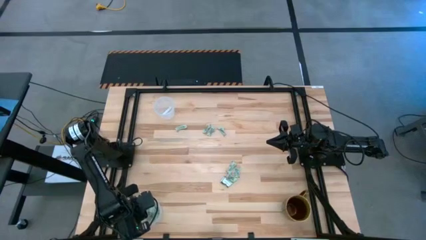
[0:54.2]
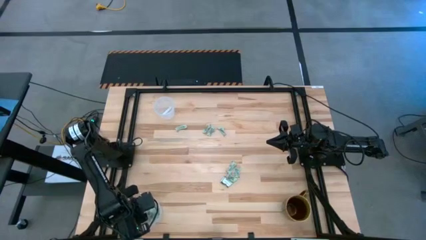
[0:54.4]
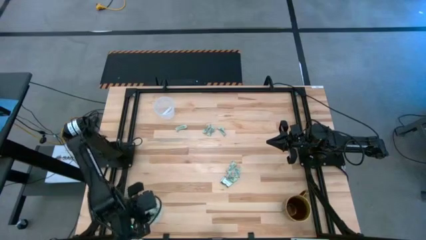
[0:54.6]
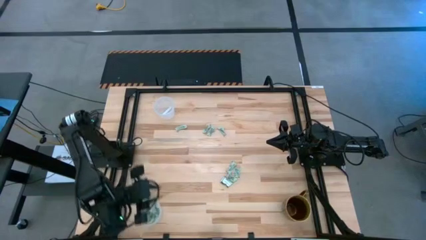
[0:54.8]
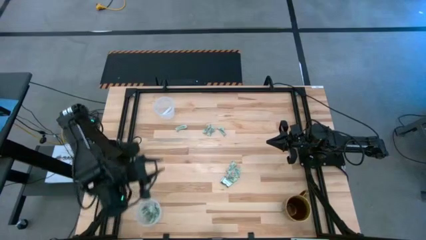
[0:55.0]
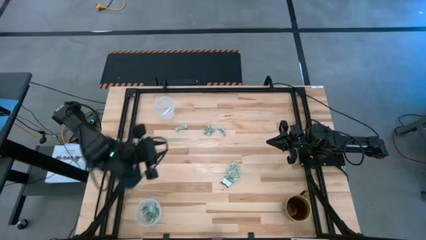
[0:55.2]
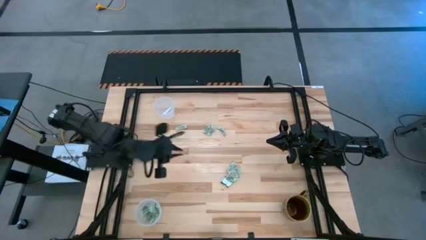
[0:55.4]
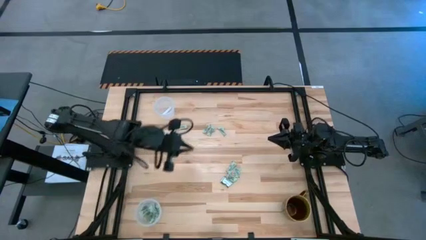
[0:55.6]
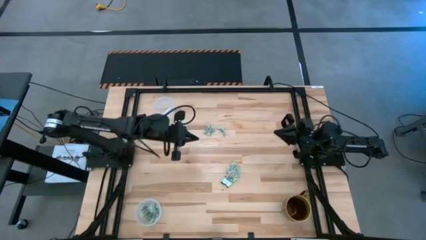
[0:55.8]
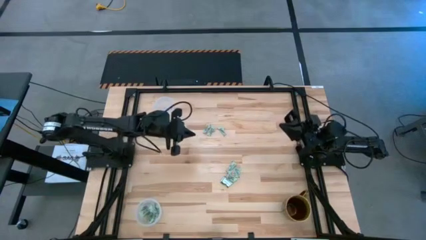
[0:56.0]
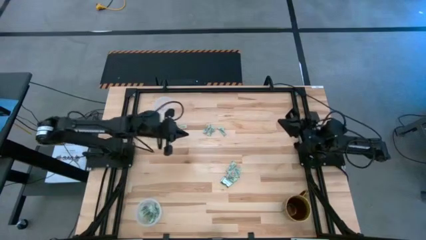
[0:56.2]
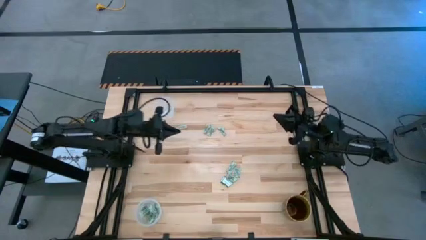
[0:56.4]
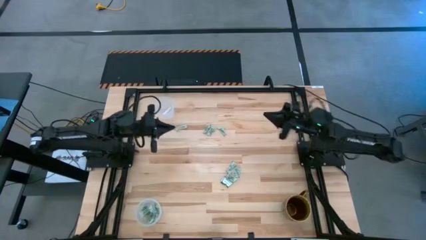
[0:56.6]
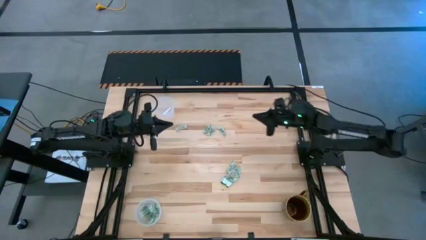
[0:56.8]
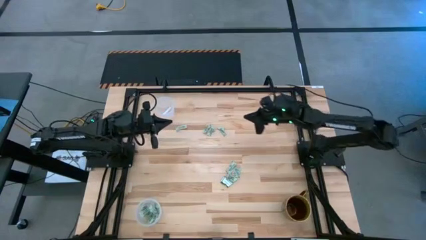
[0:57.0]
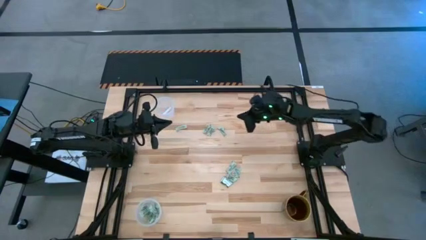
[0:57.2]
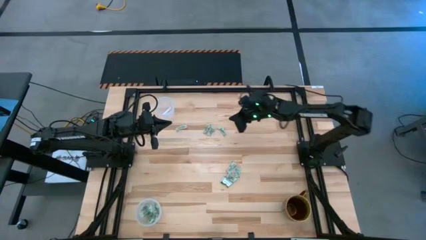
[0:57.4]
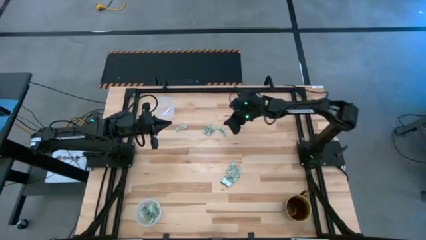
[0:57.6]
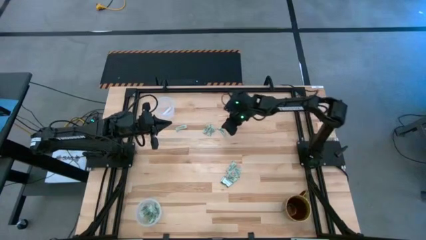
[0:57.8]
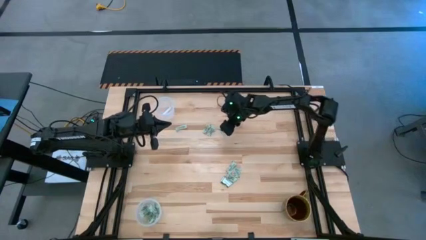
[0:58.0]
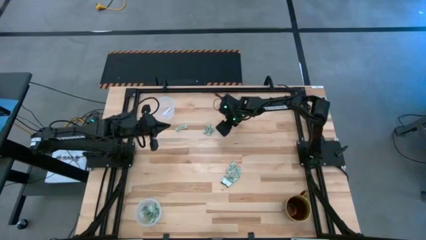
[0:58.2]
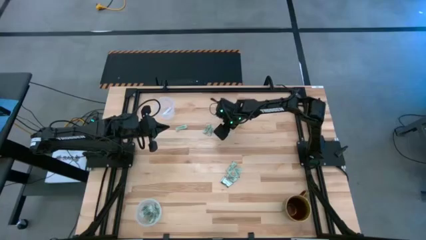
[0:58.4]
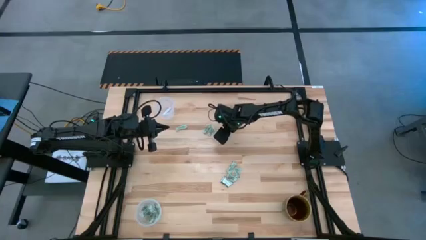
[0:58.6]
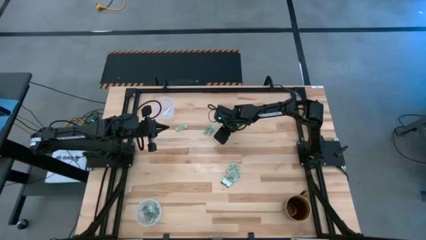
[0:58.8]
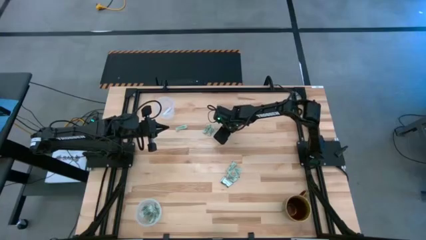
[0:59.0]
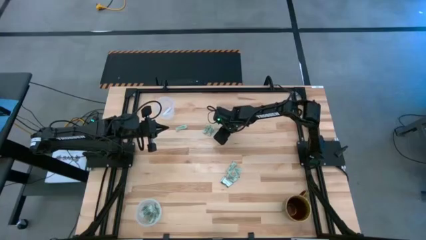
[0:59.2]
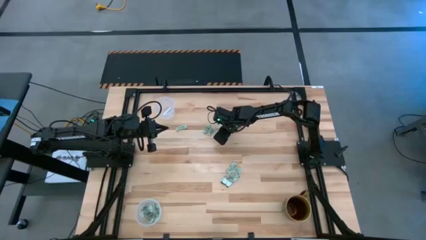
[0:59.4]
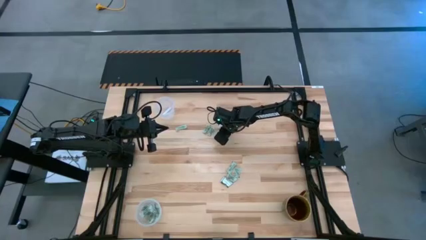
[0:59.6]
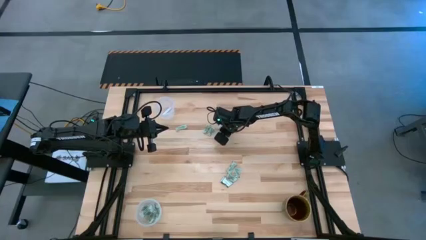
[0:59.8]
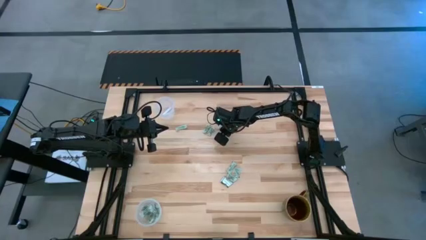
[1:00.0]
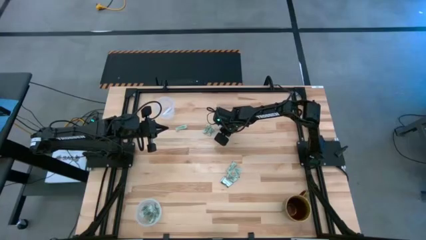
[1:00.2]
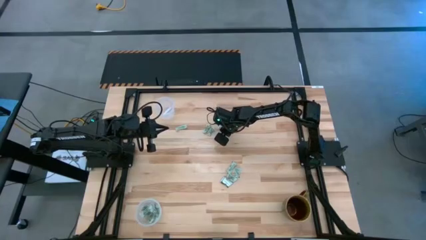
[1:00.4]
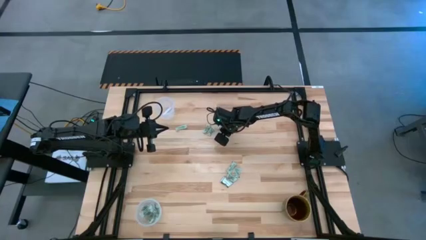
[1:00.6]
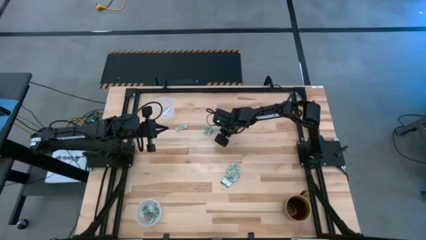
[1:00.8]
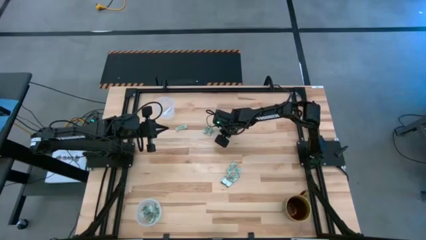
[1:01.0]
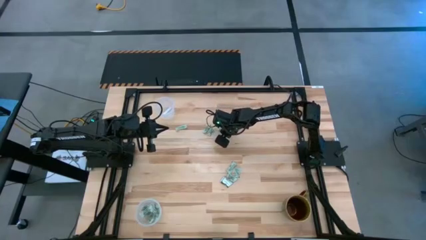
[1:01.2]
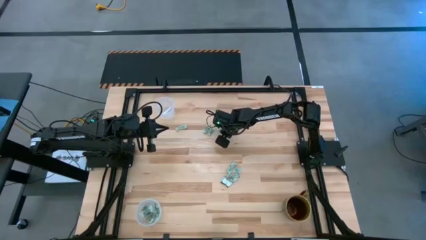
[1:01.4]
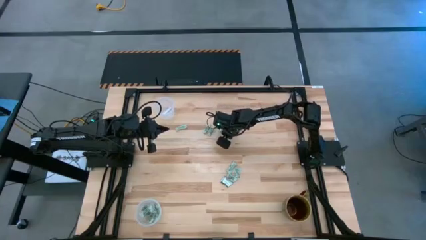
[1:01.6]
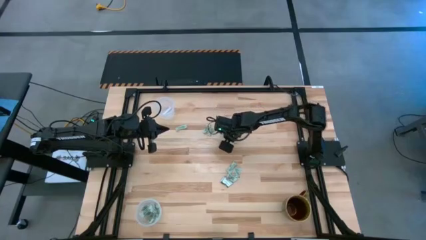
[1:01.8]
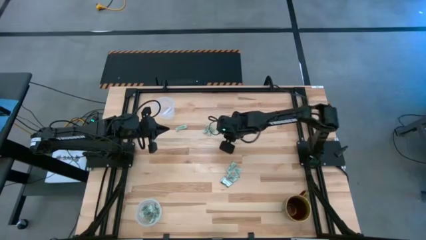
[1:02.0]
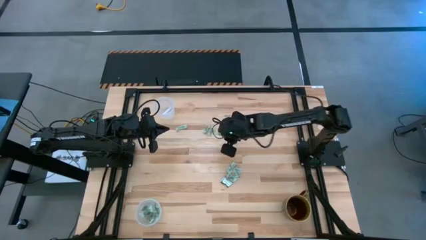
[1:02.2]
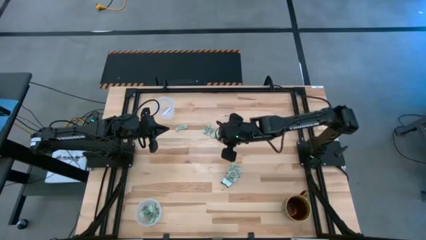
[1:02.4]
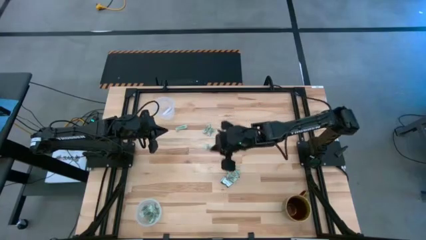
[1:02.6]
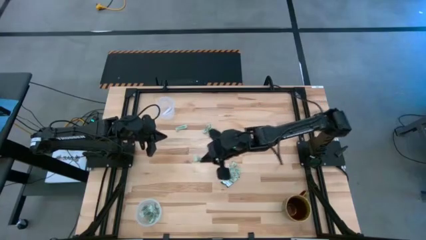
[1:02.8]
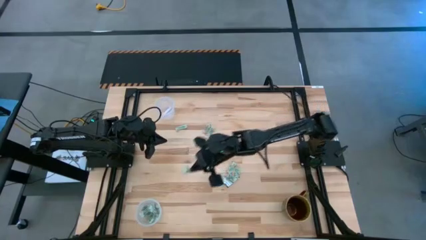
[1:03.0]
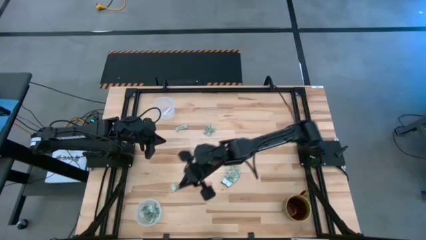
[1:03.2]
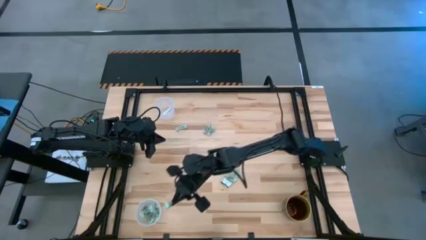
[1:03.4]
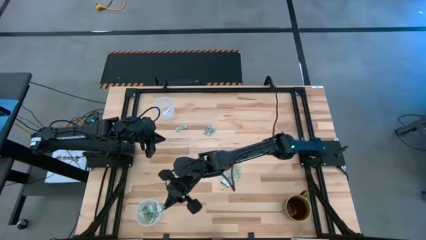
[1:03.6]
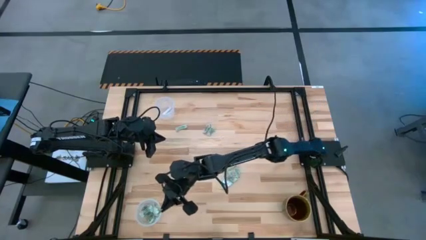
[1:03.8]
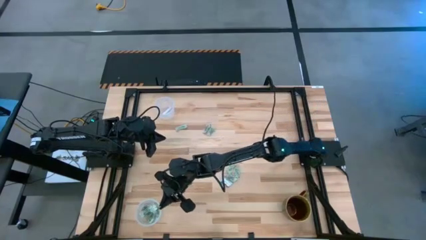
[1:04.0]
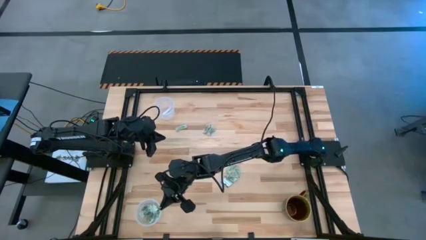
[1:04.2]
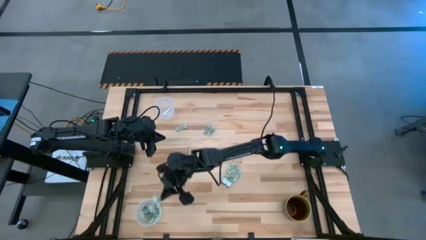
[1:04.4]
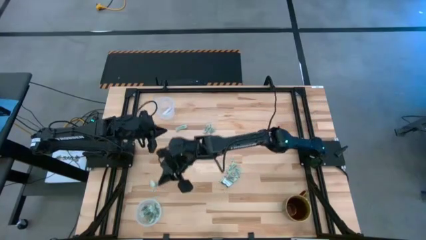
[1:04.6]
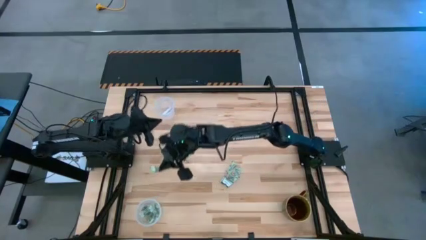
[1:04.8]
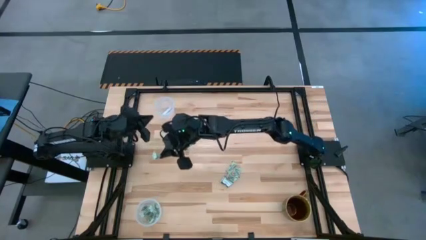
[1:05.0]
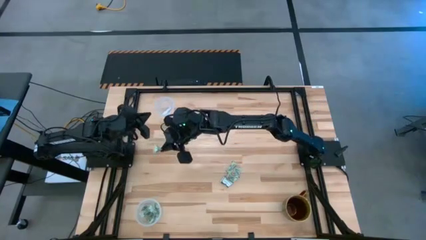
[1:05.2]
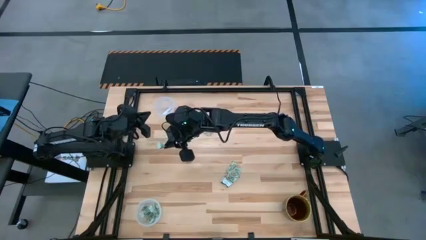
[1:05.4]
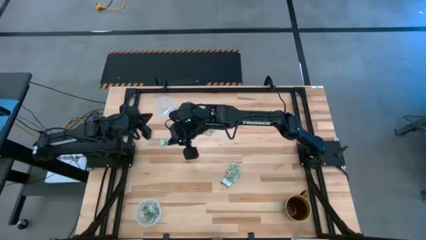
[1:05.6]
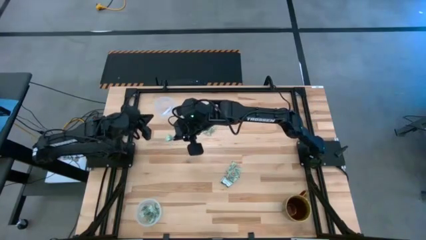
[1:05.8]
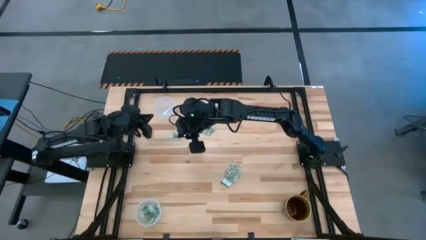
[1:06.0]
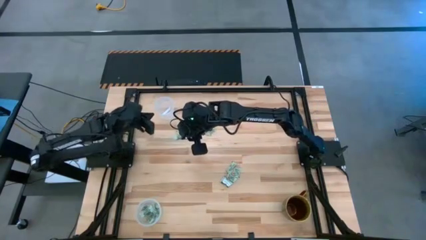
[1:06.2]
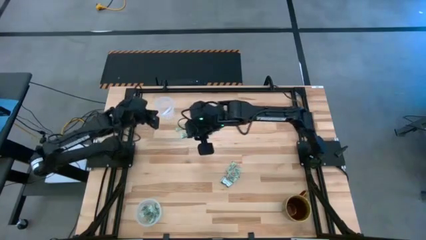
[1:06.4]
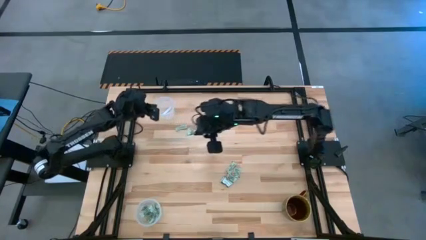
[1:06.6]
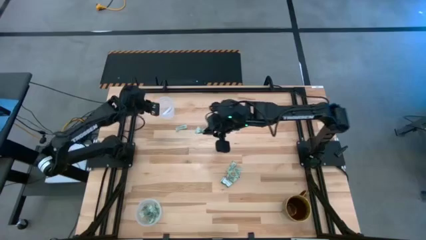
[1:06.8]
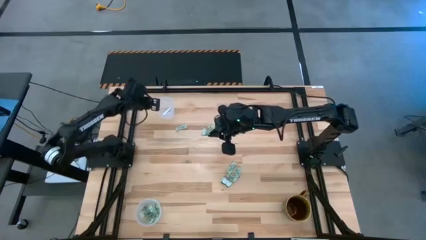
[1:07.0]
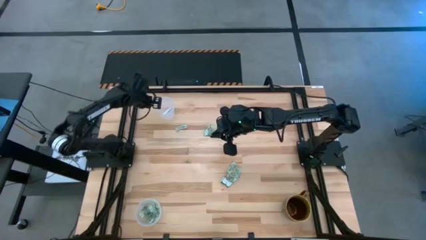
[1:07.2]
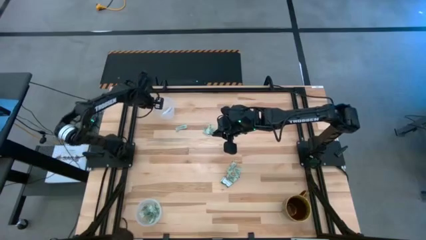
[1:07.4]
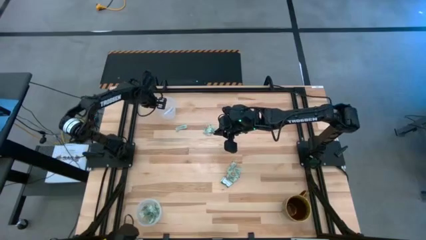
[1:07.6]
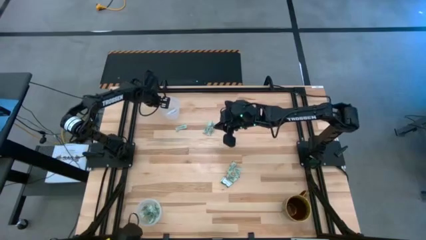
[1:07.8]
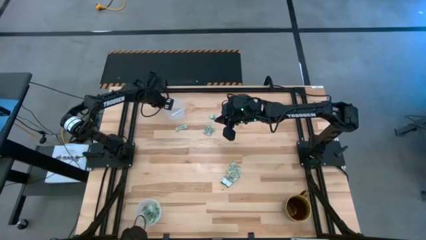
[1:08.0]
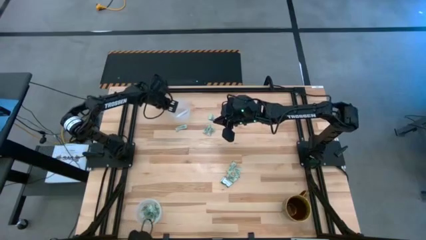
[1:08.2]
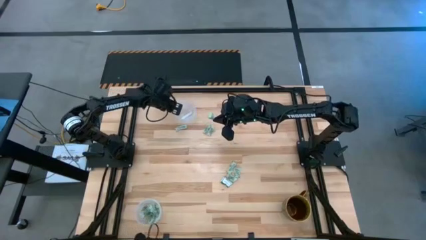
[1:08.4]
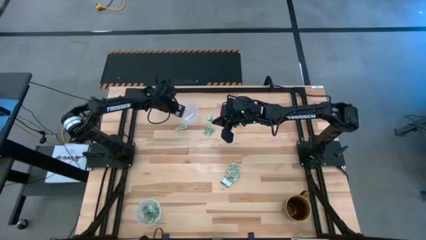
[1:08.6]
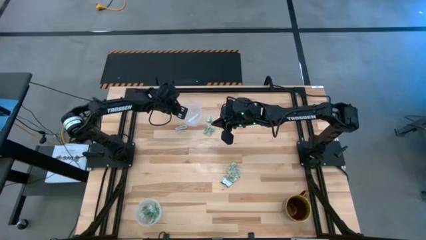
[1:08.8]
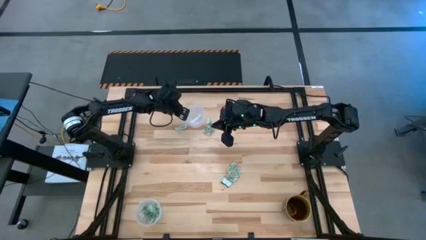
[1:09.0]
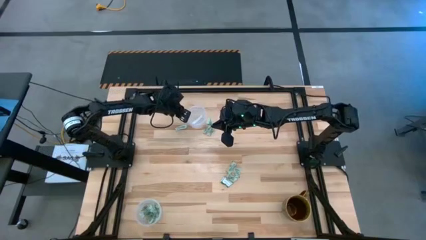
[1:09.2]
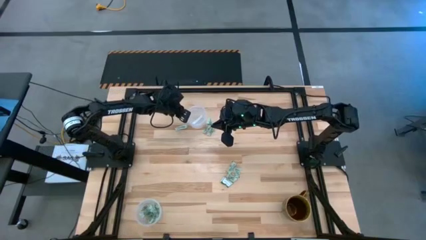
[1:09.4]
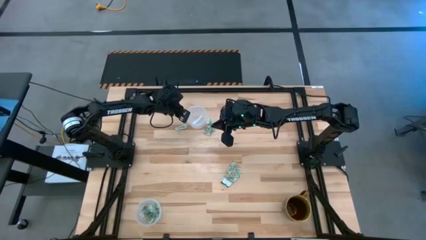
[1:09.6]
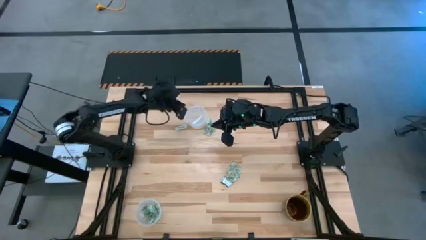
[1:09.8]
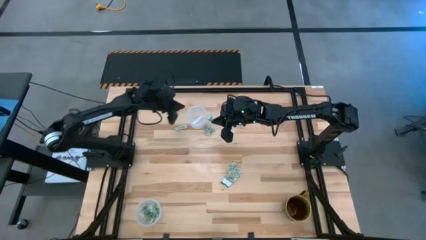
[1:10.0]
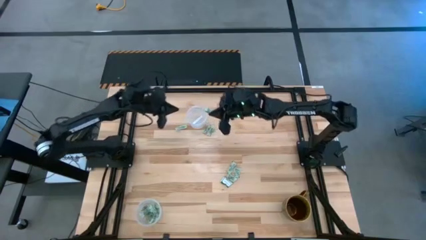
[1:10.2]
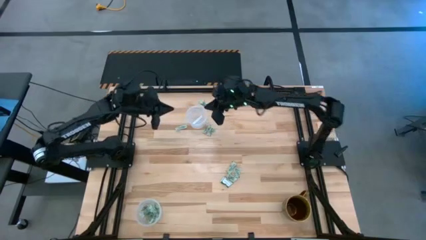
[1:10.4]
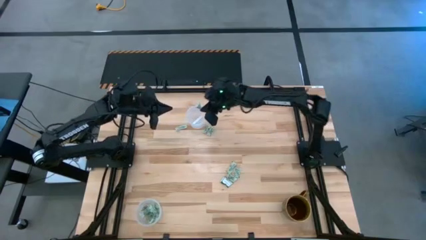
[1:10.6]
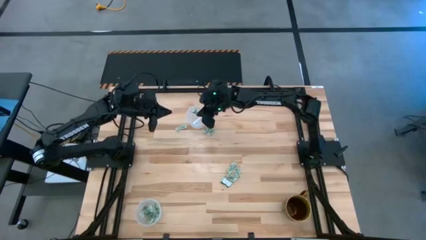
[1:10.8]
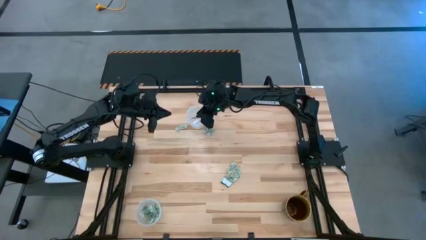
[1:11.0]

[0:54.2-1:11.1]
Task: Pick and place Stevia / Truvia into bins
Put the stevia packet into the top transparent container
